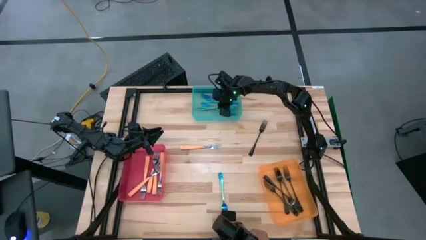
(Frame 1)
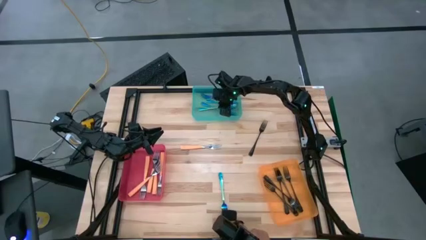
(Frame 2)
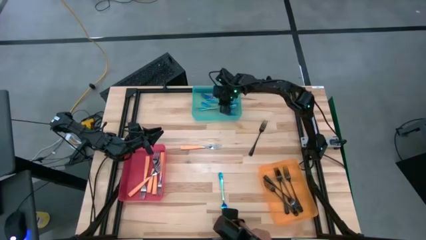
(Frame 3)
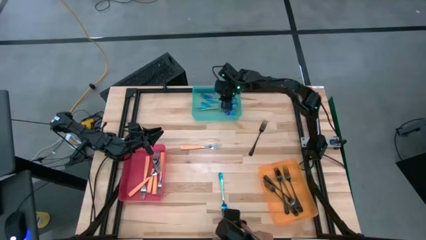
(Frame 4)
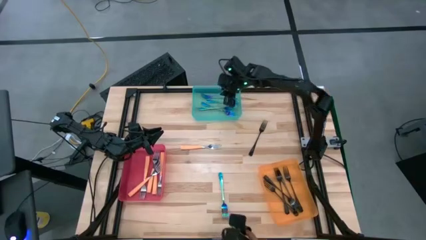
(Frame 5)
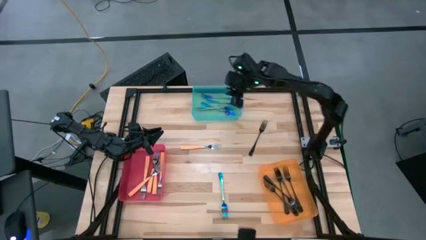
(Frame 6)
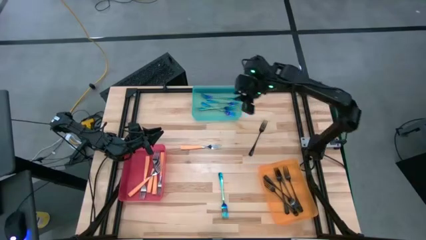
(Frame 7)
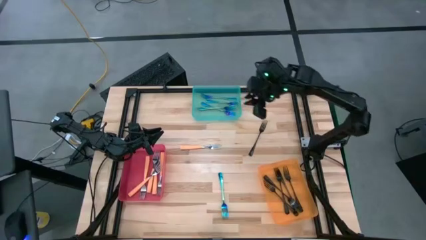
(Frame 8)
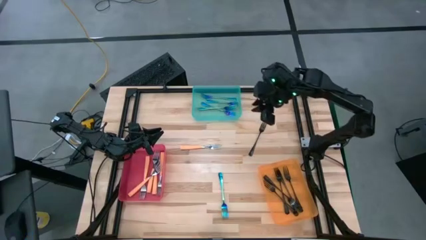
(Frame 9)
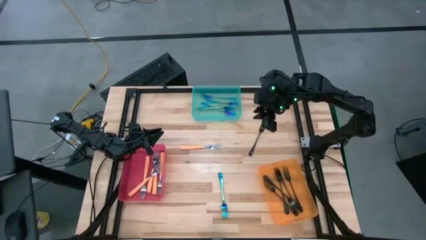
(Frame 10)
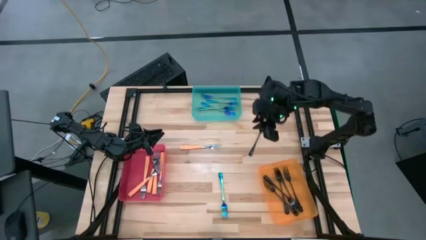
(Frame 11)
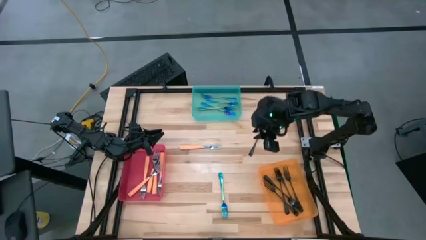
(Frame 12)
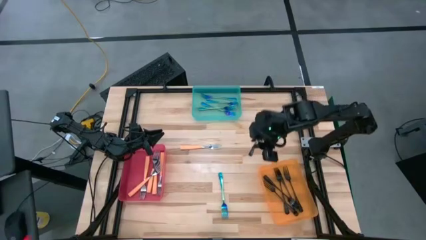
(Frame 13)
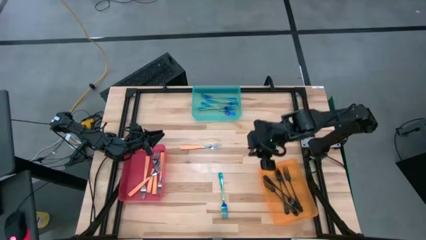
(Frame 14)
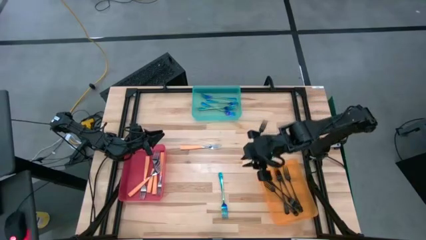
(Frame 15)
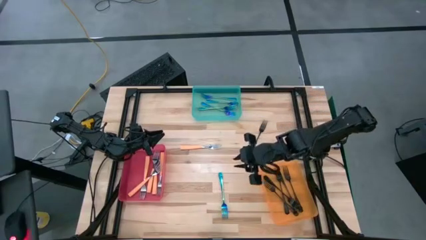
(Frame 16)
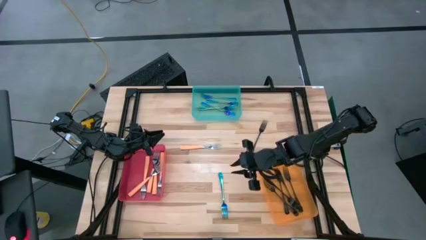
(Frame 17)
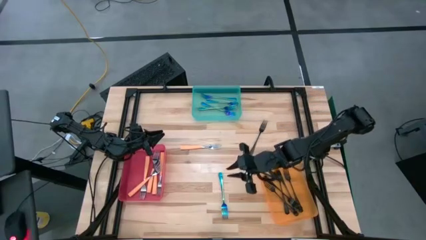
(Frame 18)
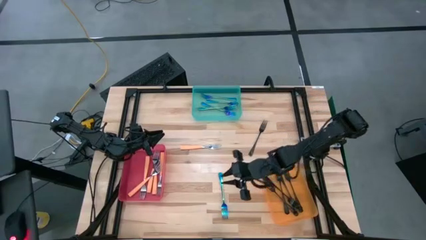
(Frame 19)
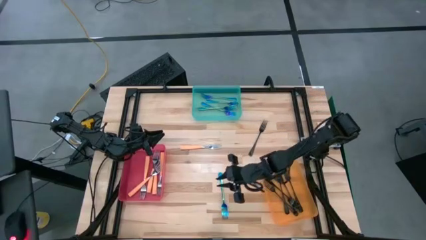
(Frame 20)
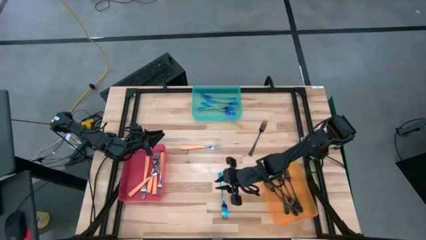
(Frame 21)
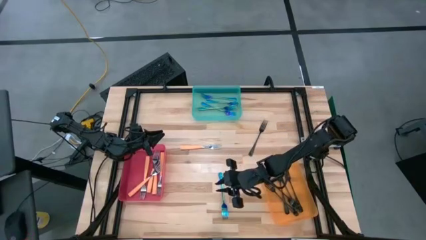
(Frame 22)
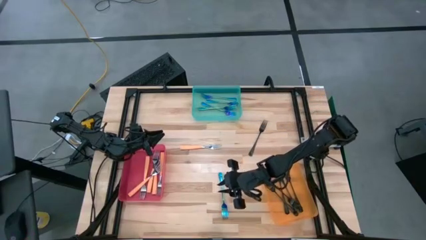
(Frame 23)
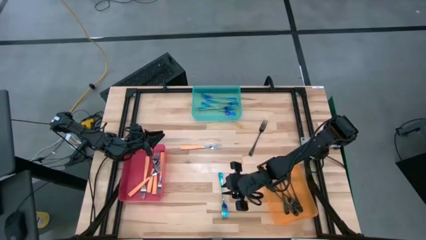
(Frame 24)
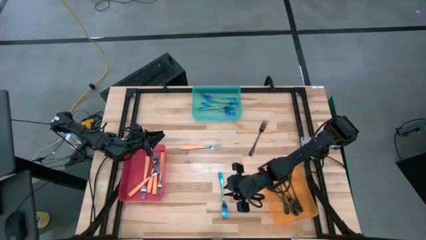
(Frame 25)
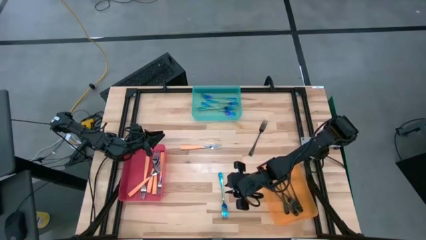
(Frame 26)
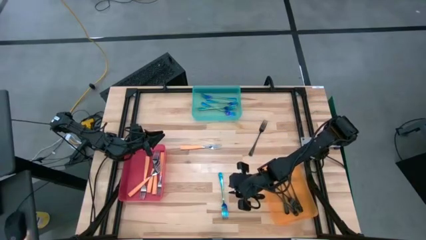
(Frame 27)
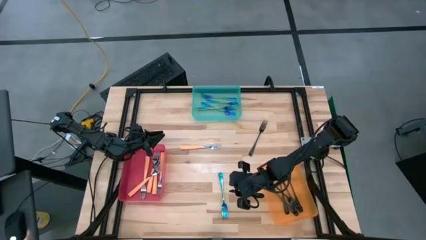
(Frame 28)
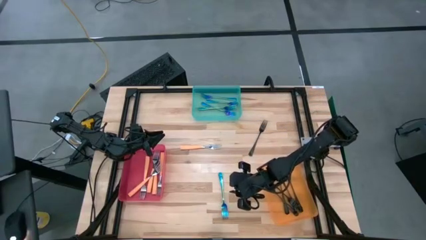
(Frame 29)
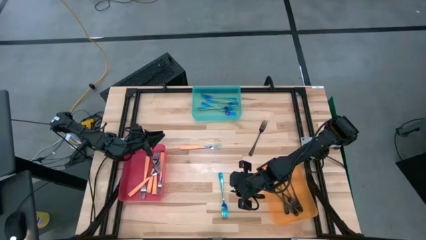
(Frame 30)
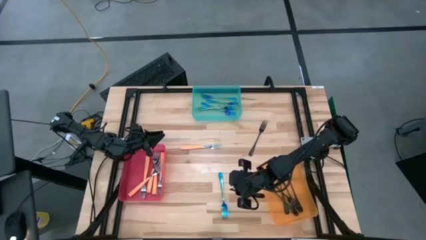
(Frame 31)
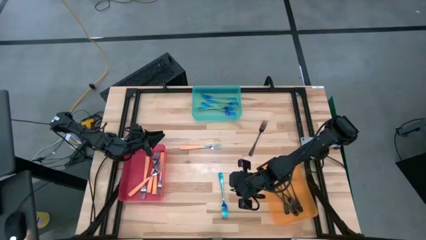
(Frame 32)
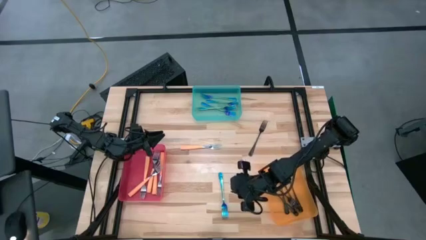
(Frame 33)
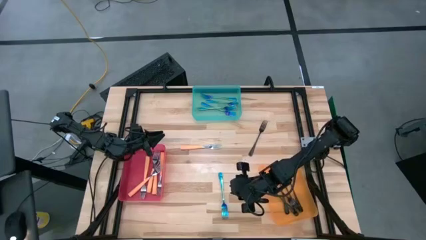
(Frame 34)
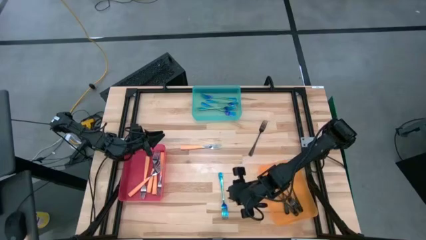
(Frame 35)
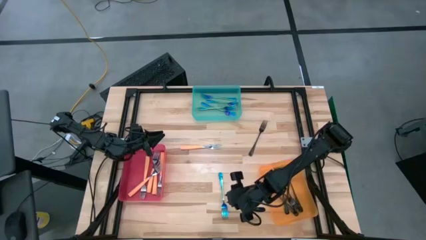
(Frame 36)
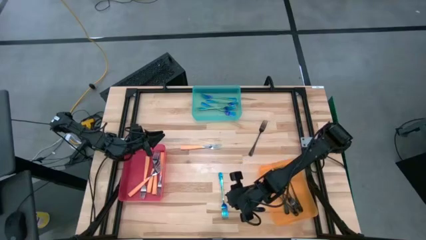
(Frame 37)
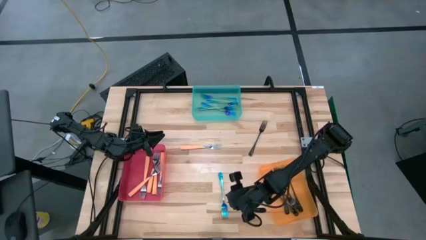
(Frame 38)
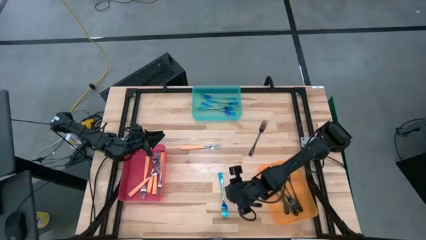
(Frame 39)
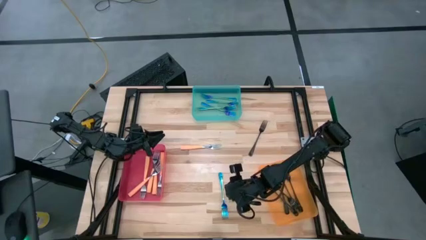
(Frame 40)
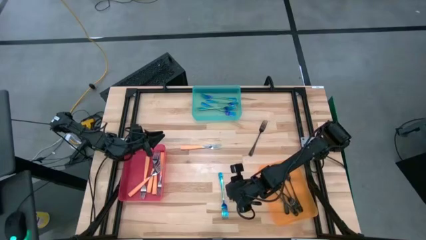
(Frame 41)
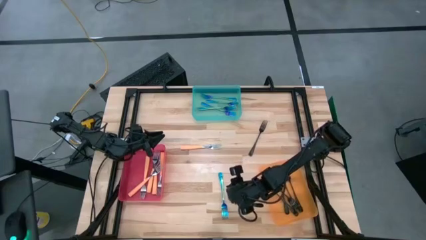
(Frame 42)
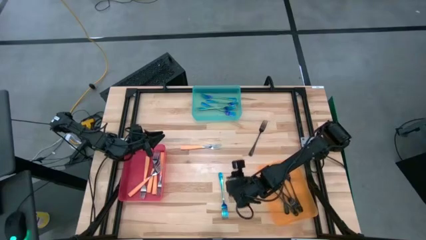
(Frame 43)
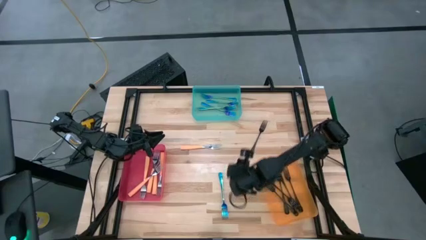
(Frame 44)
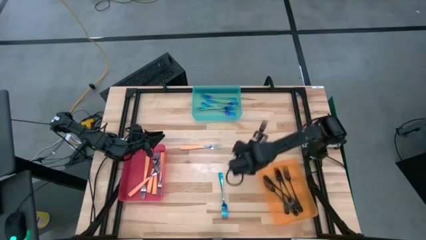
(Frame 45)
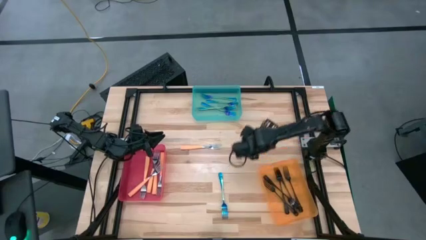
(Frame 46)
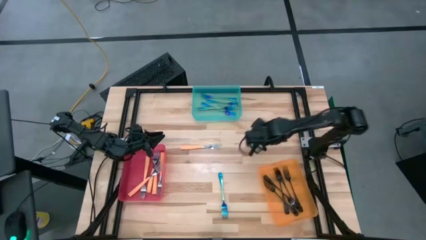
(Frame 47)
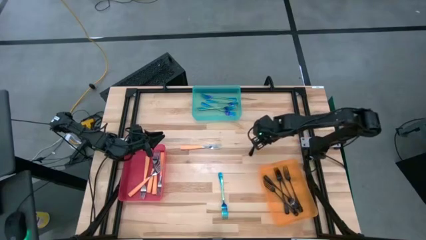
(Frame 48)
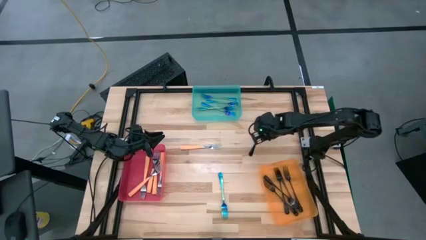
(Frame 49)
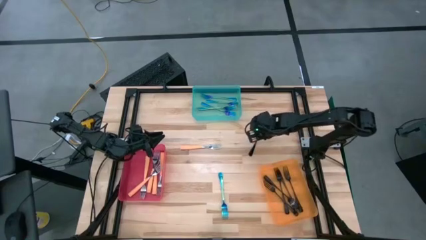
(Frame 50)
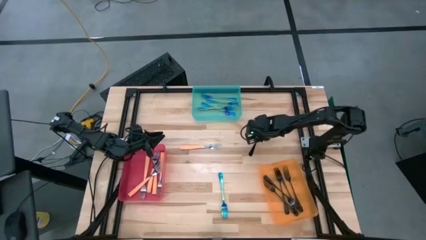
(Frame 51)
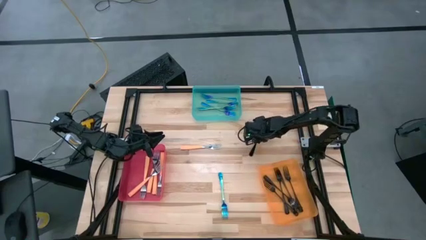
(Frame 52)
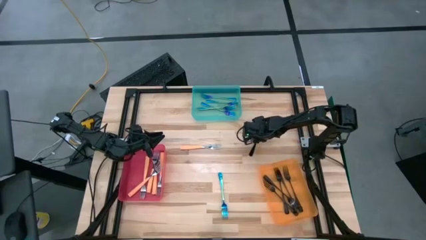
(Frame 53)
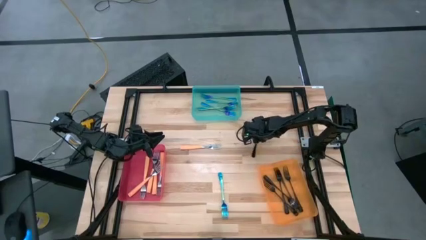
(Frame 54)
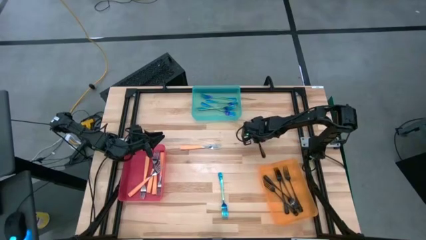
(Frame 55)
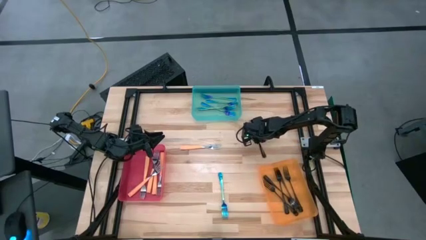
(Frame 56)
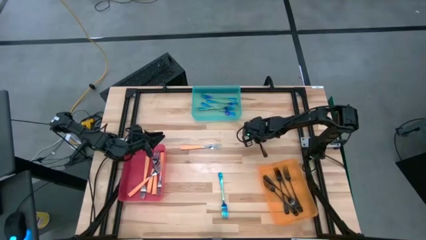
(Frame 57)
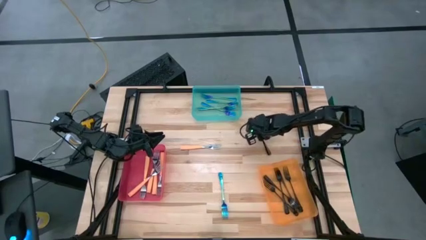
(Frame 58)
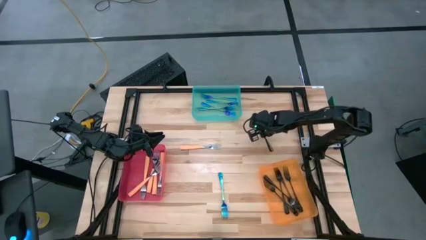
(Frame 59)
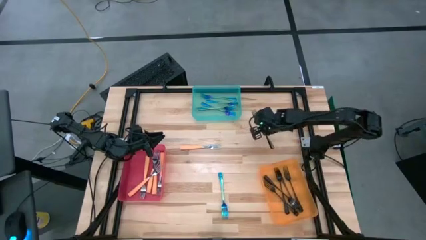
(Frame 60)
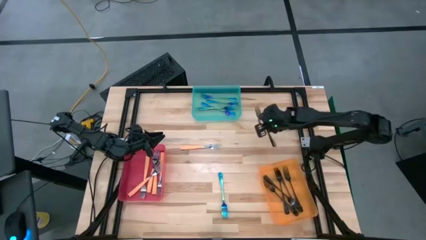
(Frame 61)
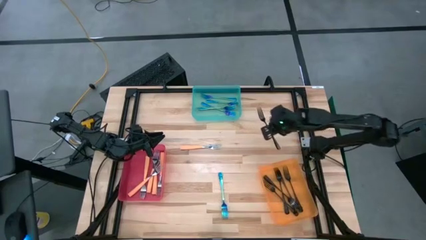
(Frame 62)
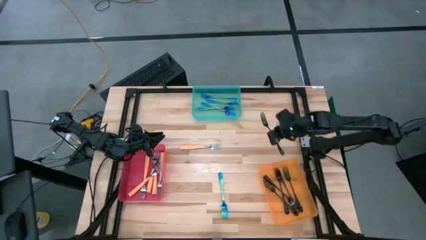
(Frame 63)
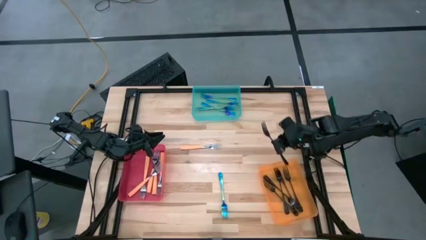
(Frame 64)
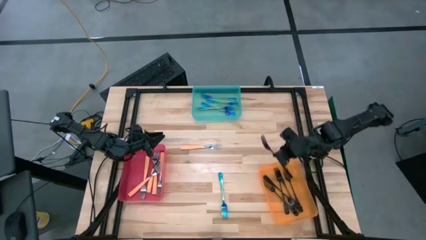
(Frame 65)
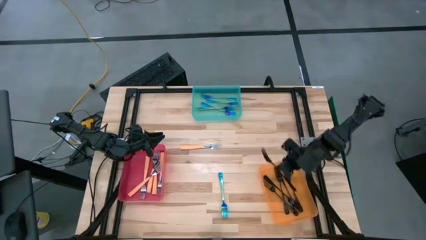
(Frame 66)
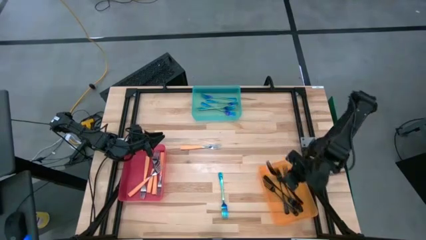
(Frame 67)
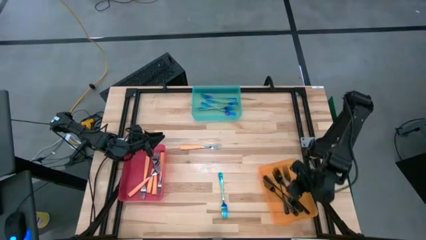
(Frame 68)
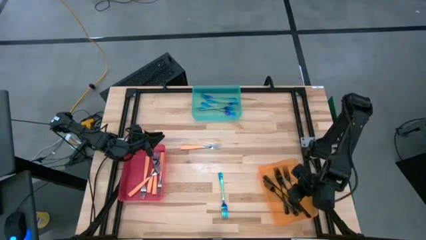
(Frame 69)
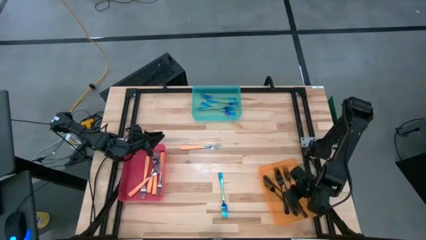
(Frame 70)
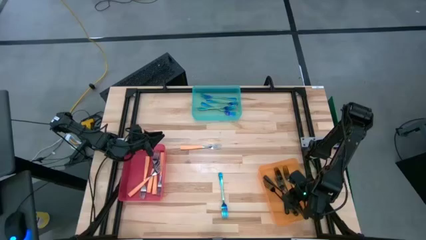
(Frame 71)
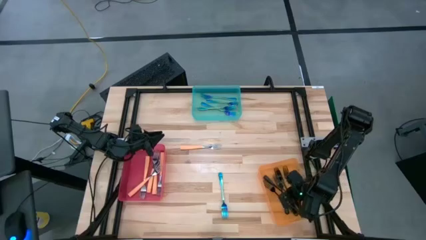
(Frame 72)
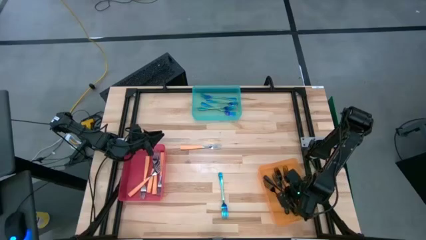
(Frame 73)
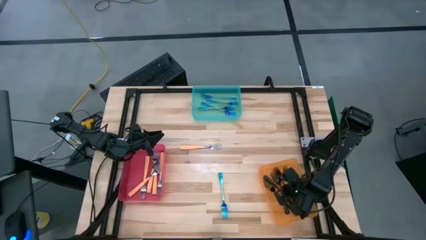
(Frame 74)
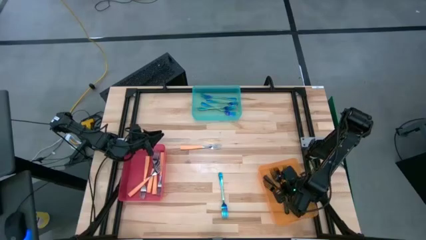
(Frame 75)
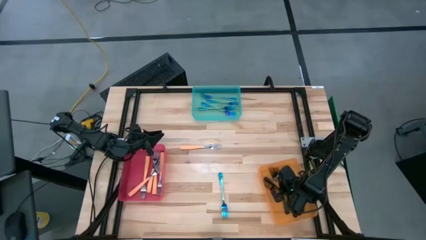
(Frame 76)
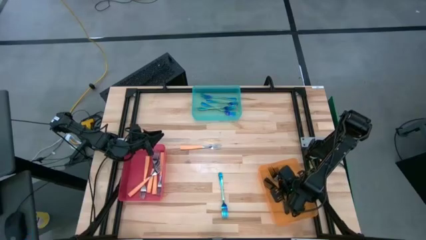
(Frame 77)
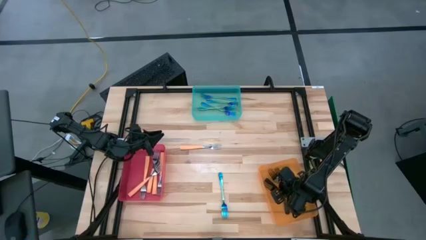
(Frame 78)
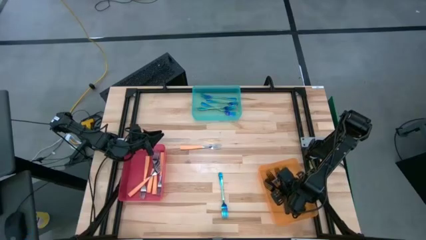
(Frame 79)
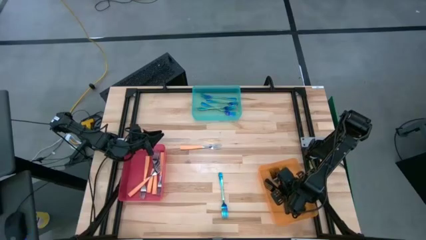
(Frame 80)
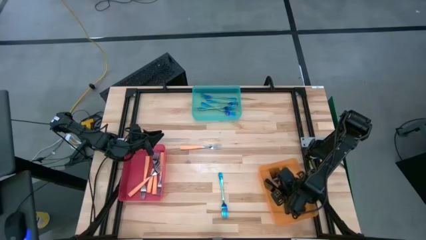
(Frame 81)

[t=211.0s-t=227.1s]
Task: Sort silverware by color (type)
Put the black fork into the orange bin
